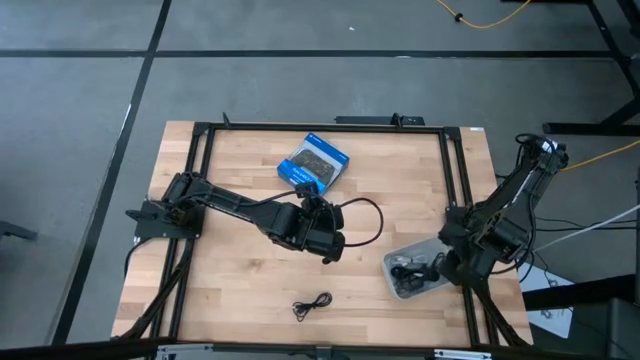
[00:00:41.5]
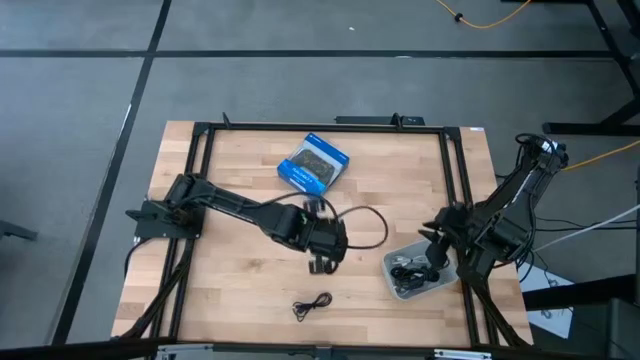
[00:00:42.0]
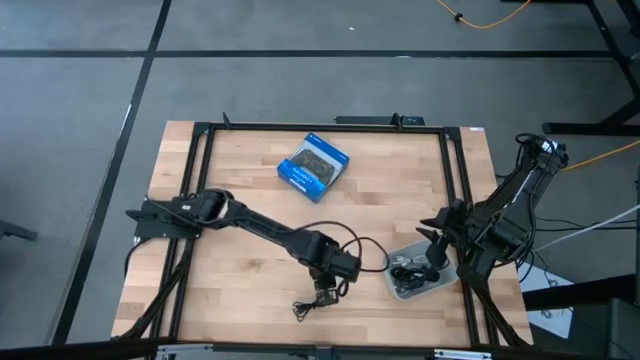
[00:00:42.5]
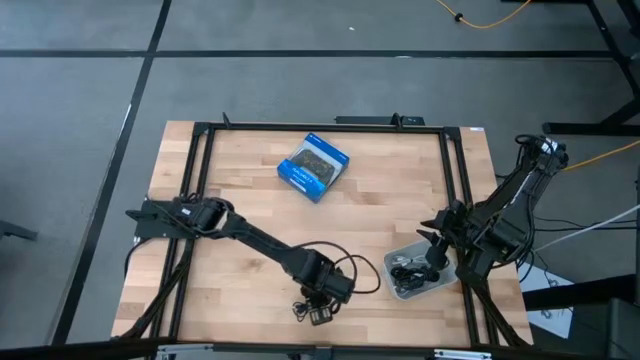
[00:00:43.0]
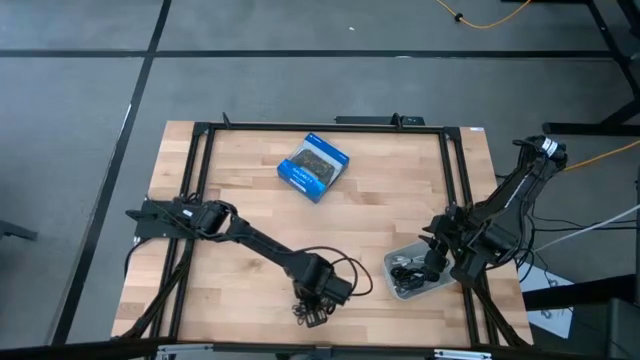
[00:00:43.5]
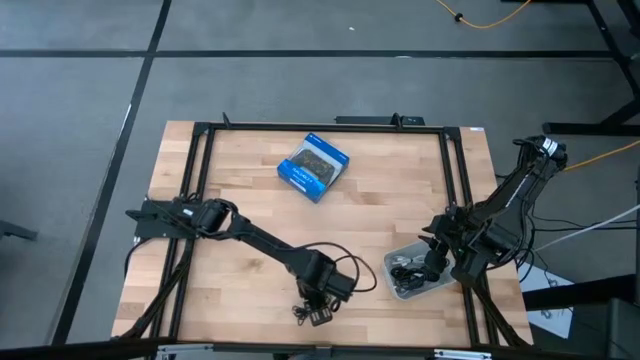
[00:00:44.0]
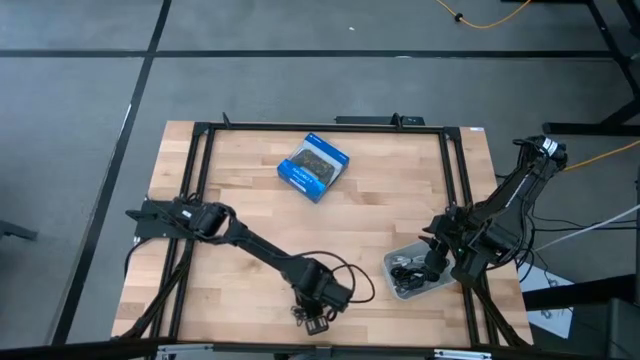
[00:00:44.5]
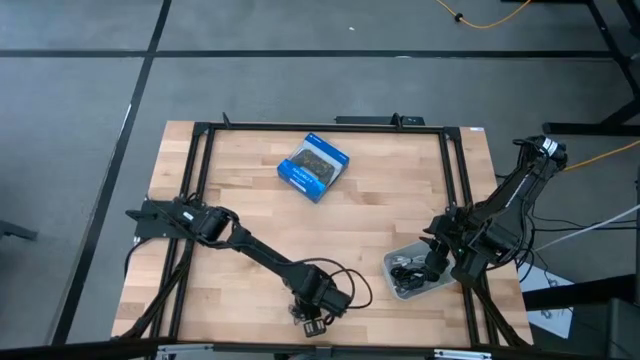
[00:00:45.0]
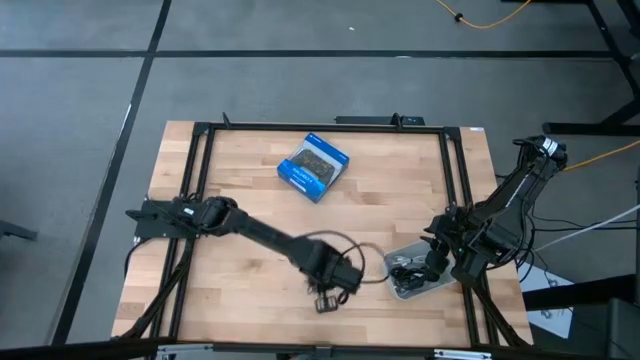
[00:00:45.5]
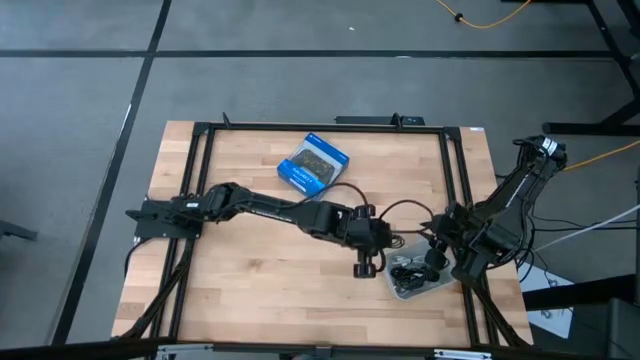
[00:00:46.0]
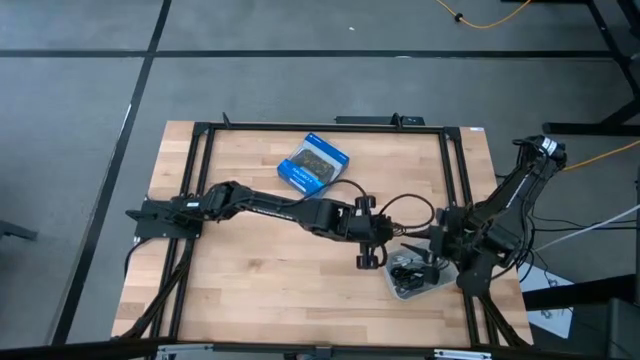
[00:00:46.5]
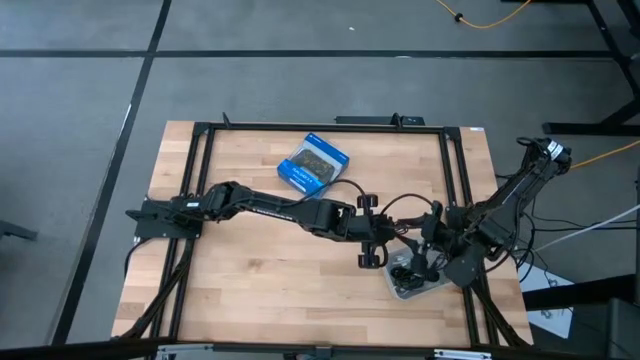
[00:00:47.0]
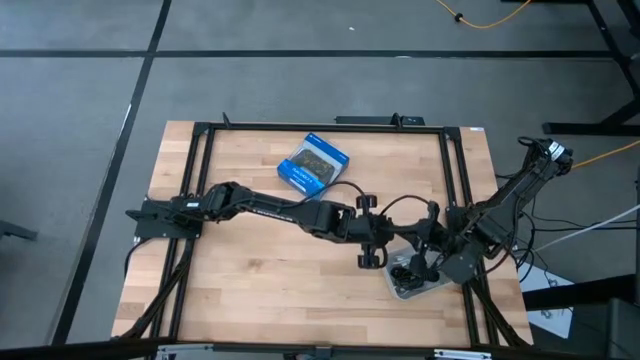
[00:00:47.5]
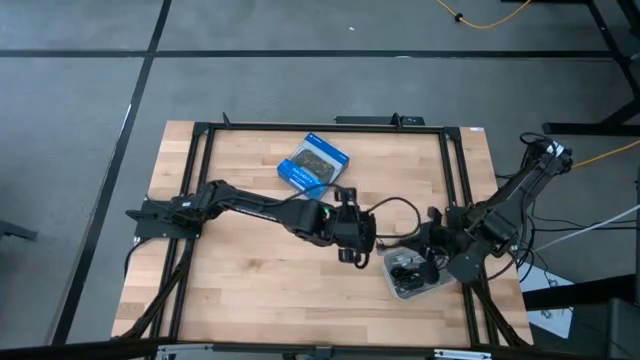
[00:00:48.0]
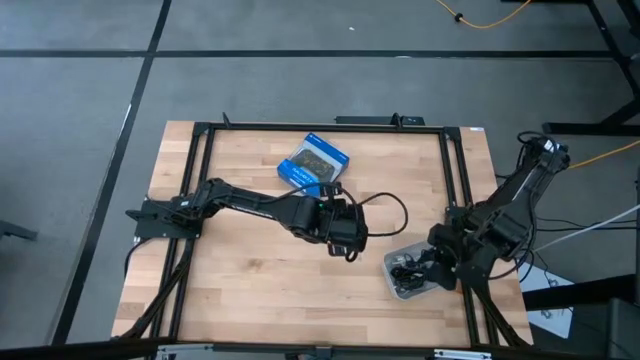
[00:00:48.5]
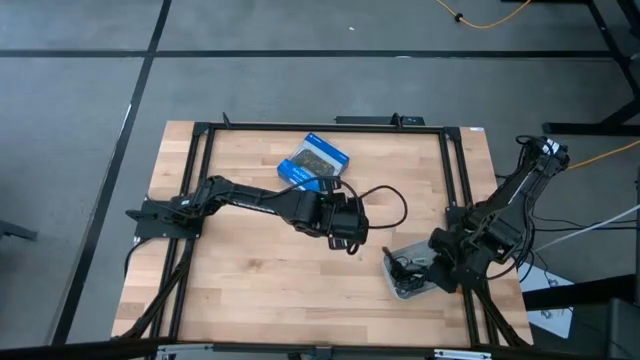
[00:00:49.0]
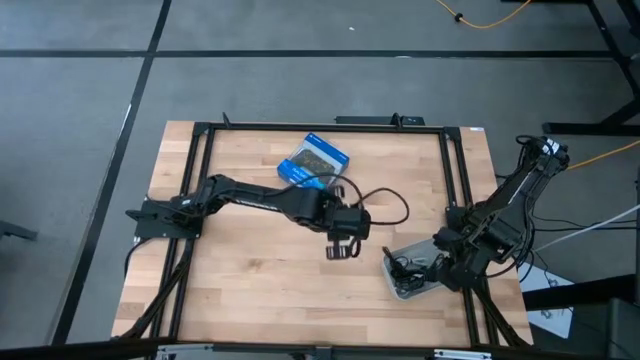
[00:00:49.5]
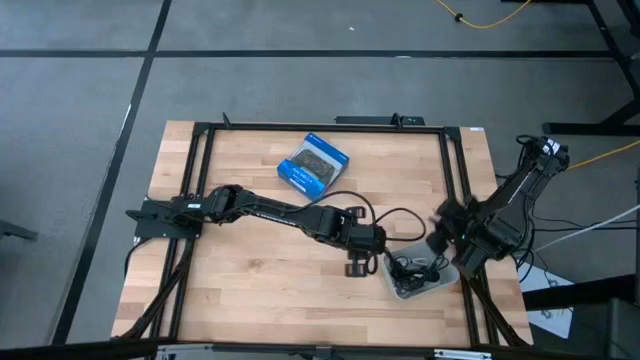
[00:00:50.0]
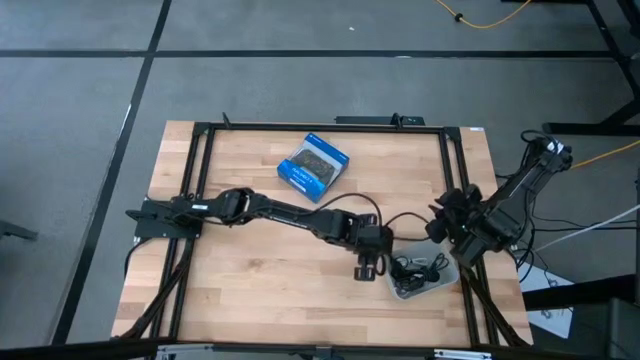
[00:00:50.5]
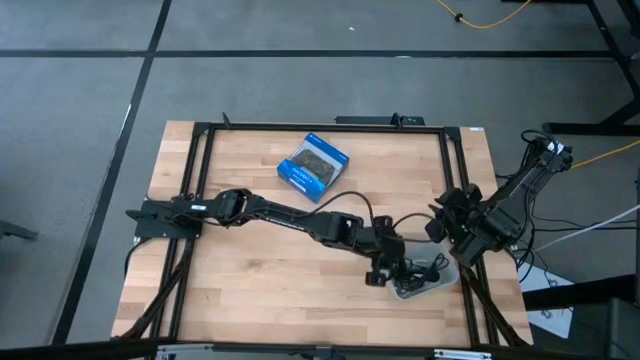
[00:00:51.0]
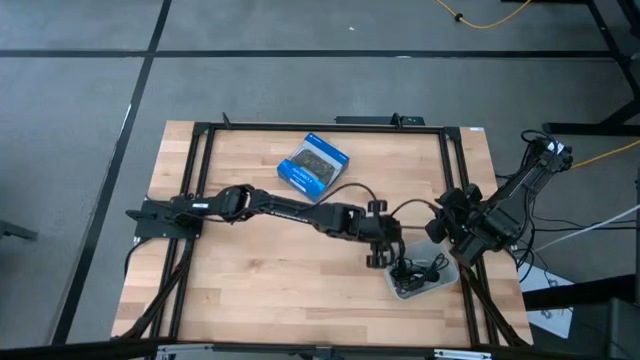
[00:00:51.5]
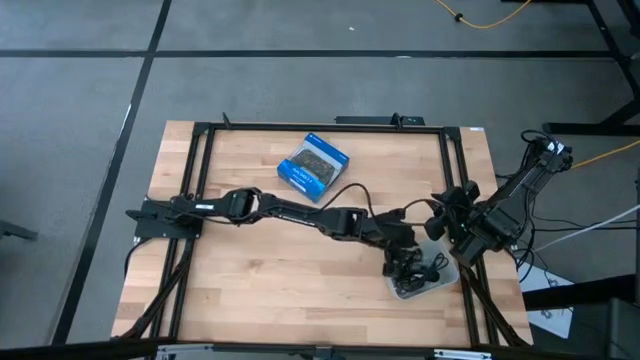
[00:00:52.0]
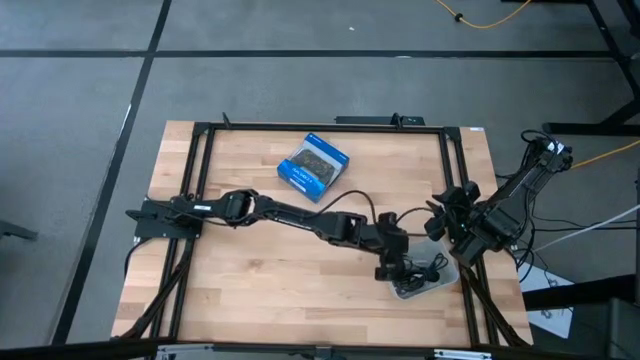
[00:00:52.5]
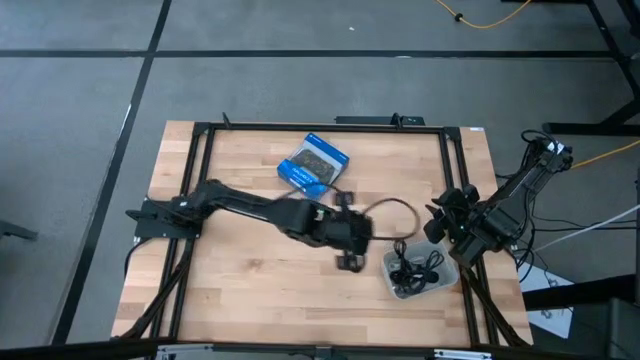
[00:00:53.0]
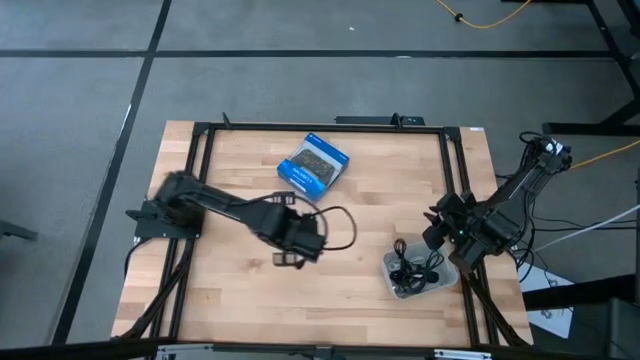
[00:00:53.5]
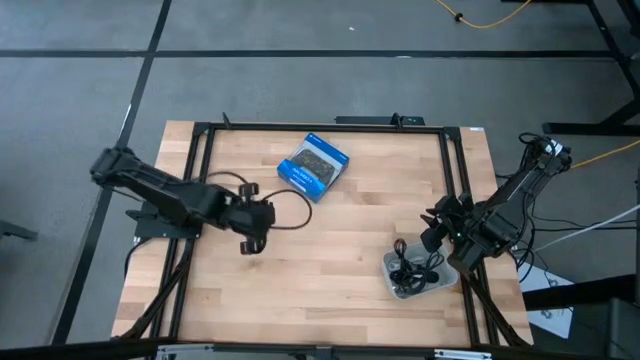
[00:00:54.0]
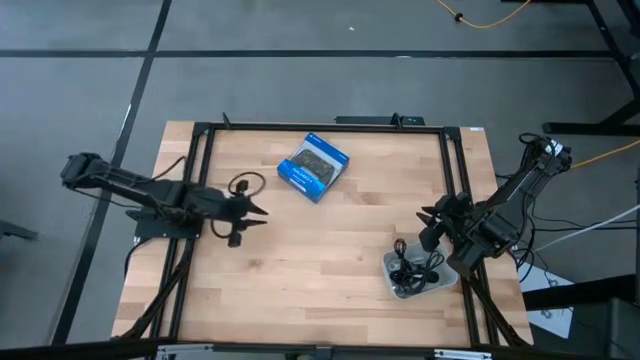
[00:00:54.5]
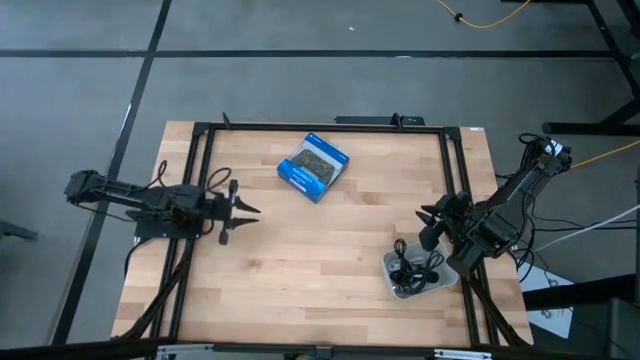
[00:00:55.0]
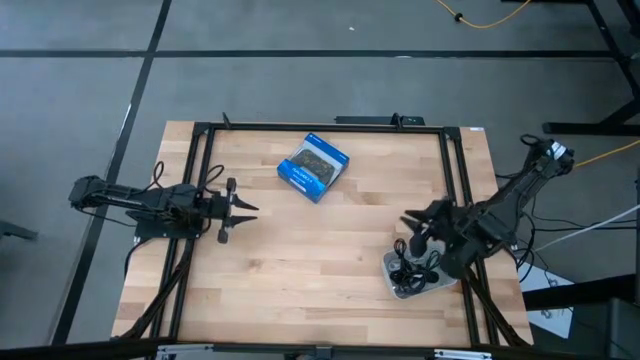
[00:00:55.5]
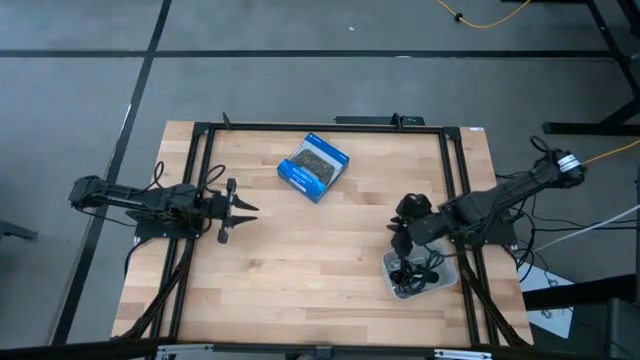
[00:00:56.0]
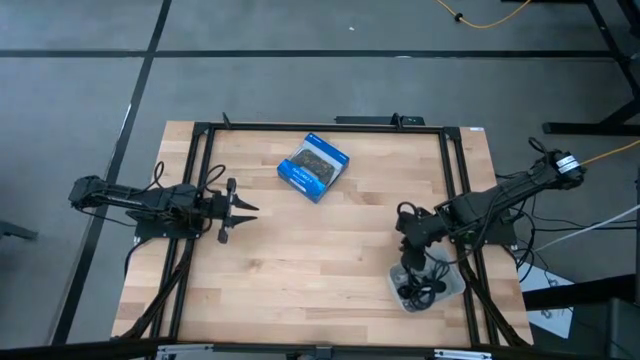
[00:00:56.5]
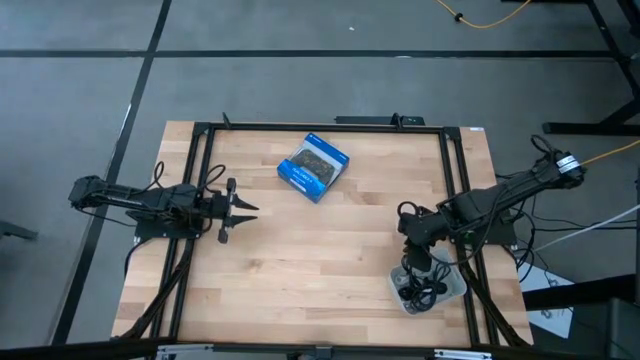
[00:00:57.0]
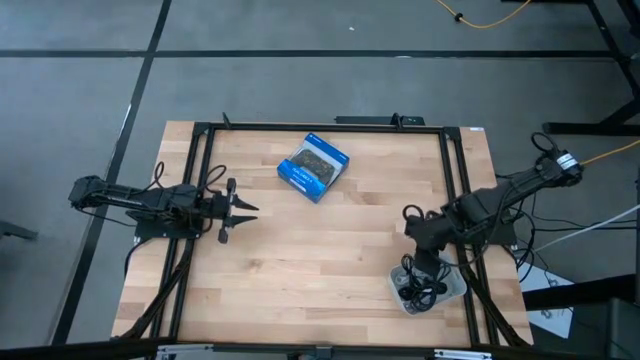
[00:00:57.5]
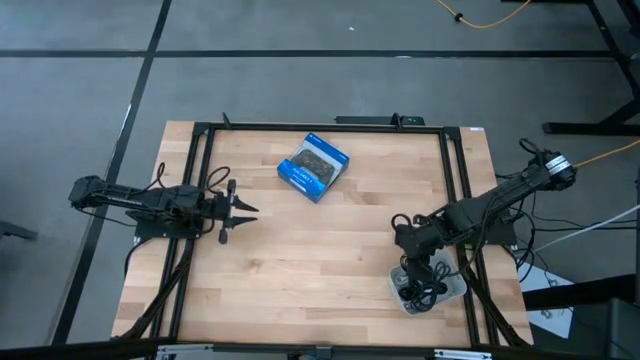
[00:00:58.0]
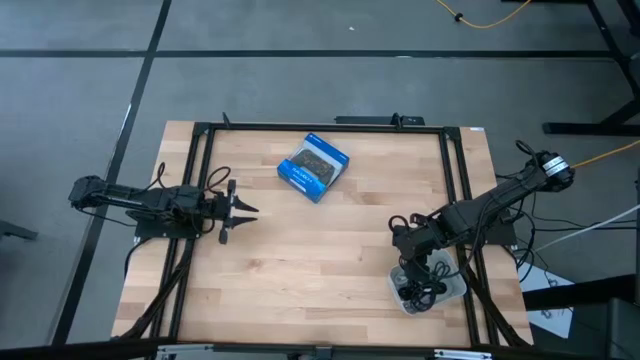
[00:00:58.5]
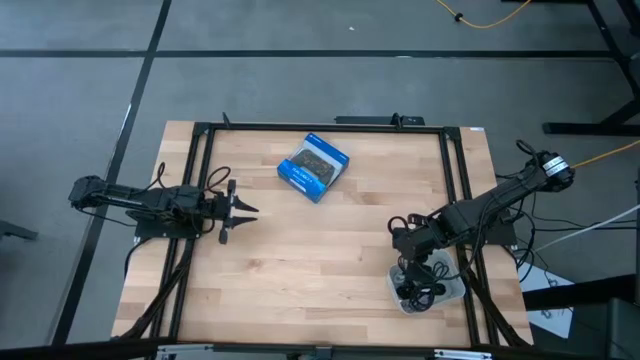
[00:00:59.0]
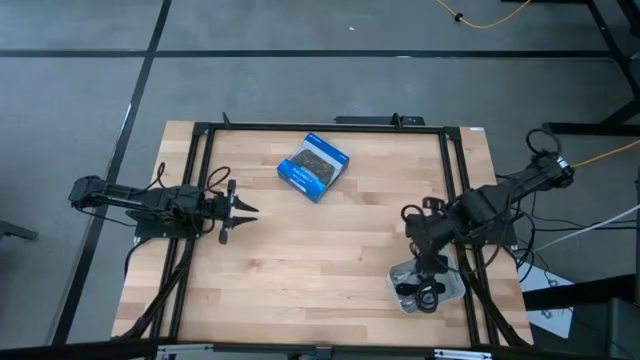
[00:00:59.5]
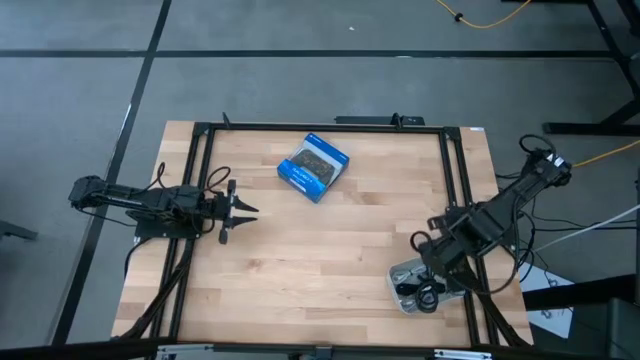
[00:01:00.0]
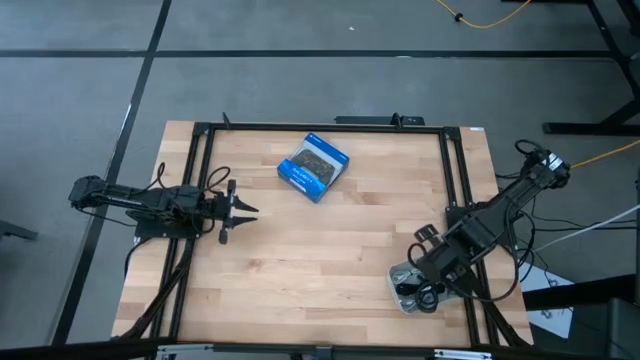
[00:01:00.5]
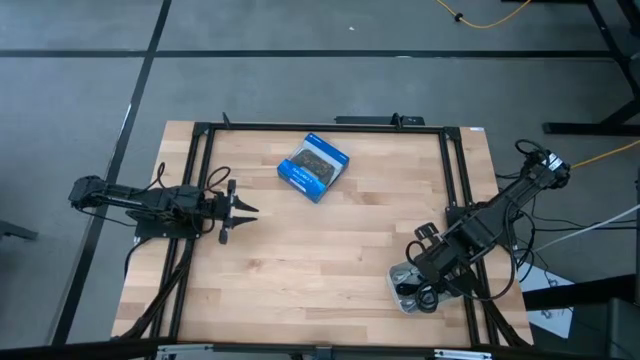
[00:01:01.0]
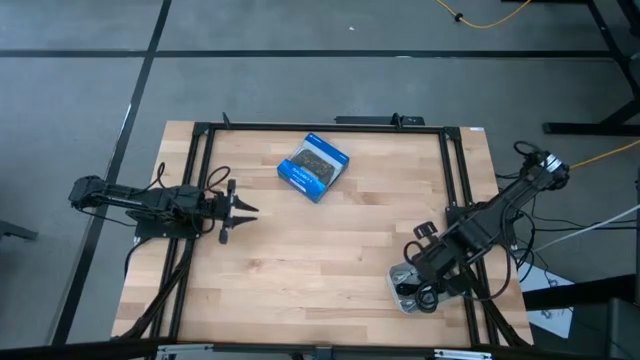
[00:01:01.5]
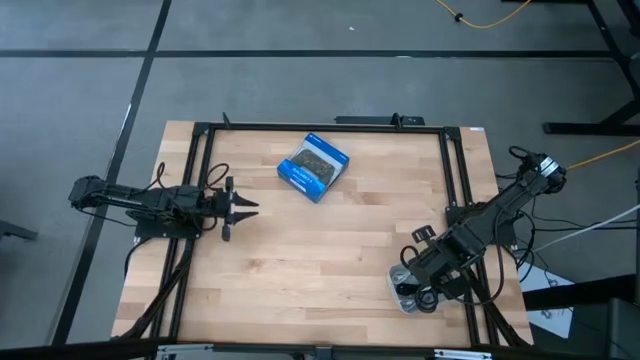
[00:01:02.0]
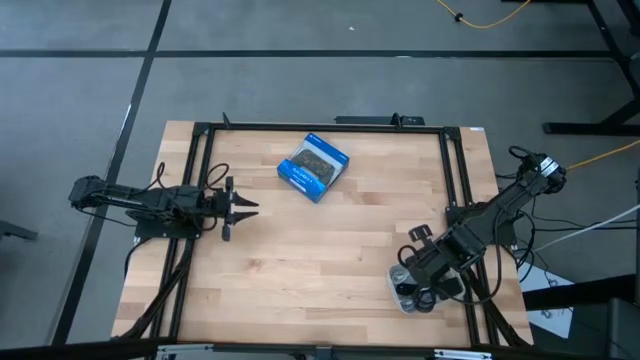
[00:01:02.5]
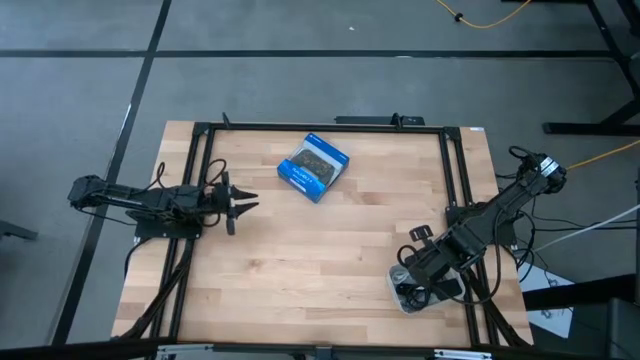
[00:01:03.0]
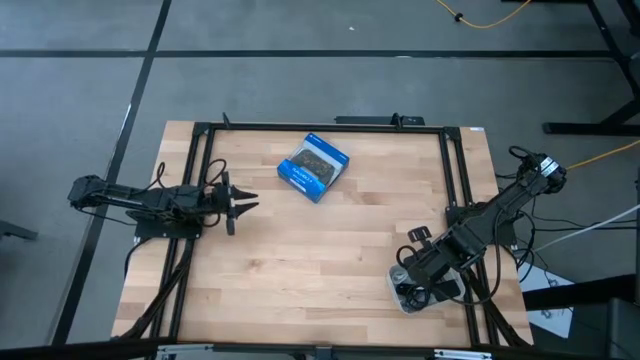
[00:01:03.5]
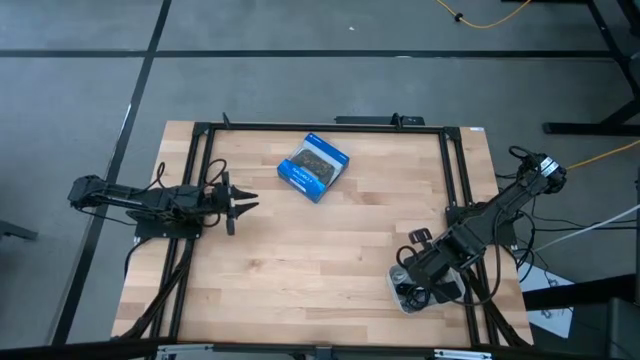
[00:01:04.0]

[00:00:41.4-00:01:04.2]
Task: Pick and place USB-C Cables
Put the black charger cable into the gray bin
